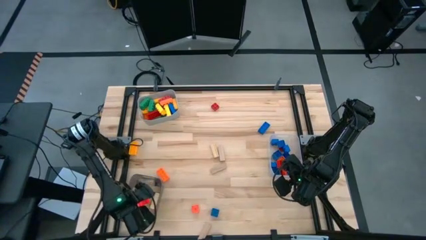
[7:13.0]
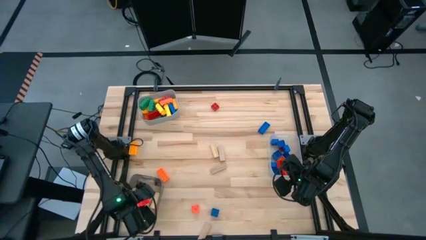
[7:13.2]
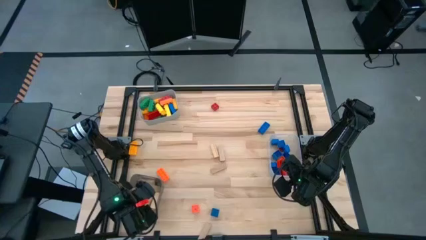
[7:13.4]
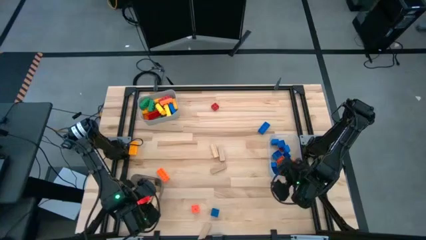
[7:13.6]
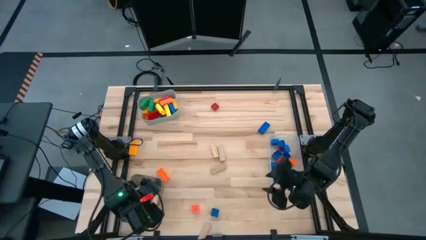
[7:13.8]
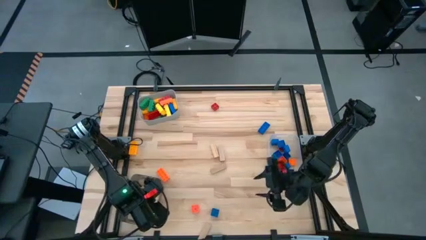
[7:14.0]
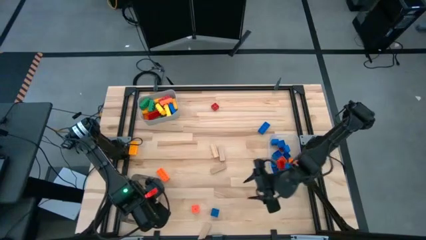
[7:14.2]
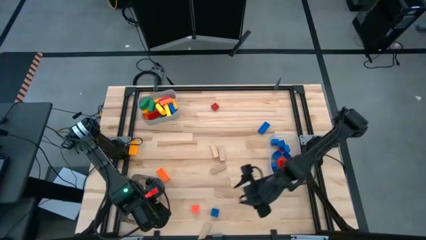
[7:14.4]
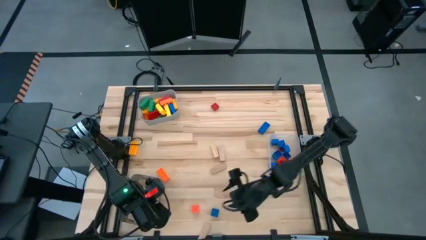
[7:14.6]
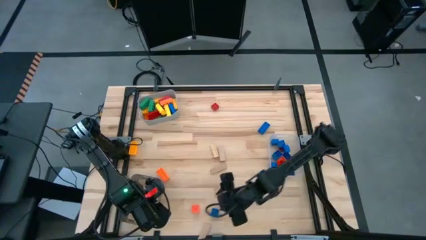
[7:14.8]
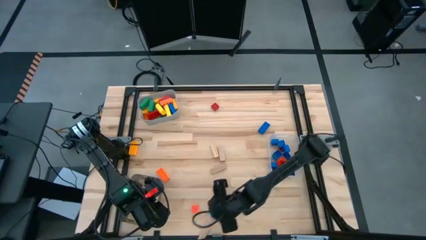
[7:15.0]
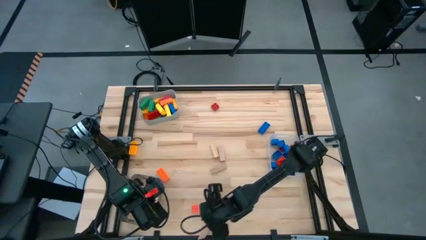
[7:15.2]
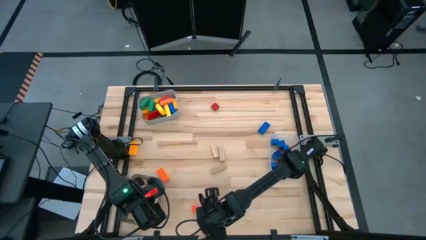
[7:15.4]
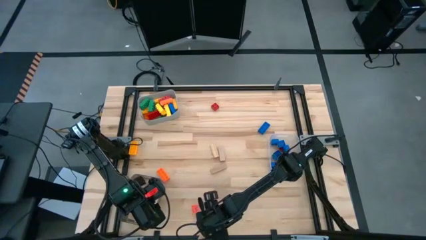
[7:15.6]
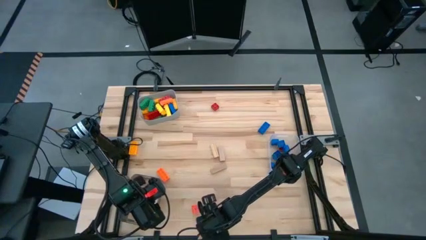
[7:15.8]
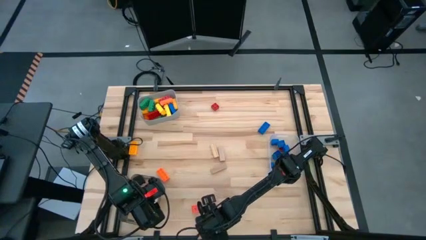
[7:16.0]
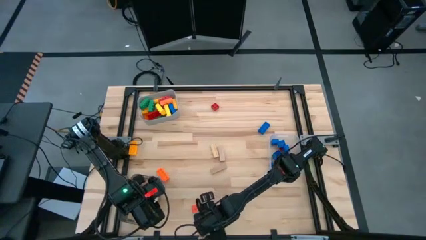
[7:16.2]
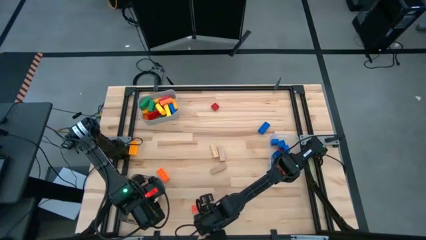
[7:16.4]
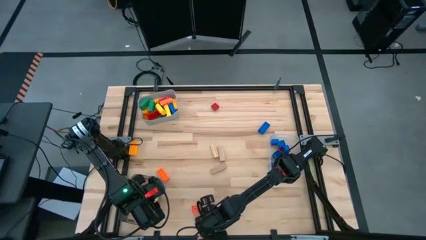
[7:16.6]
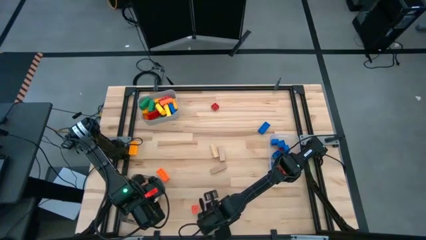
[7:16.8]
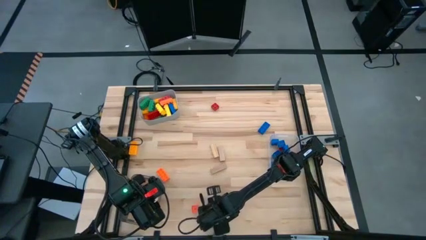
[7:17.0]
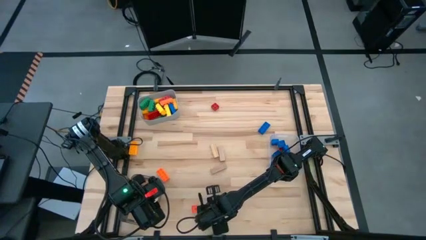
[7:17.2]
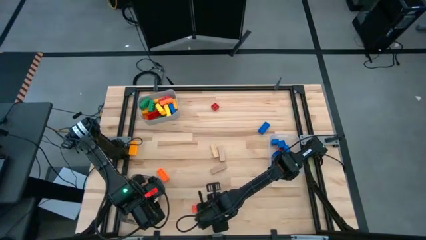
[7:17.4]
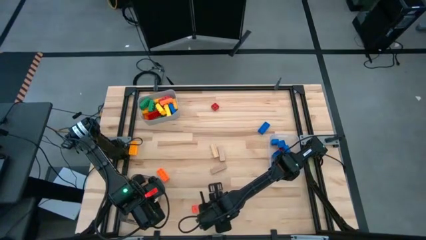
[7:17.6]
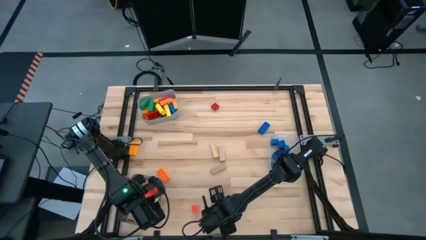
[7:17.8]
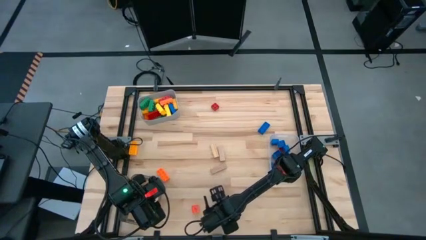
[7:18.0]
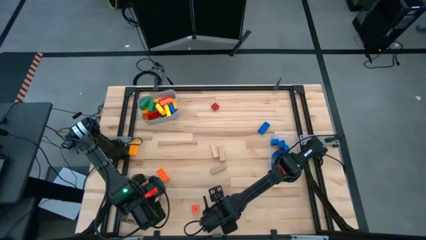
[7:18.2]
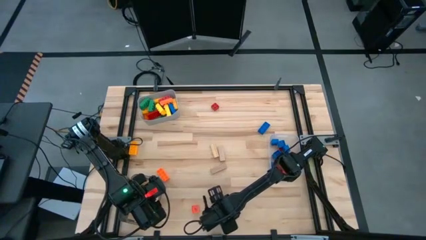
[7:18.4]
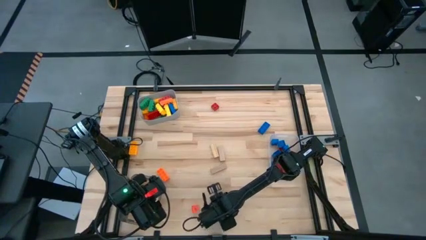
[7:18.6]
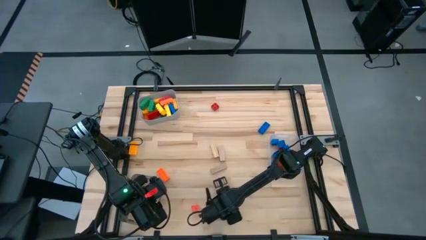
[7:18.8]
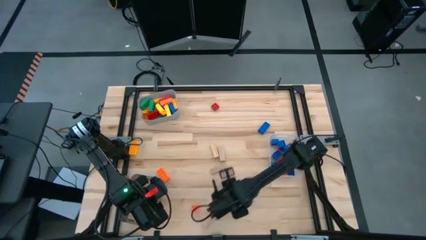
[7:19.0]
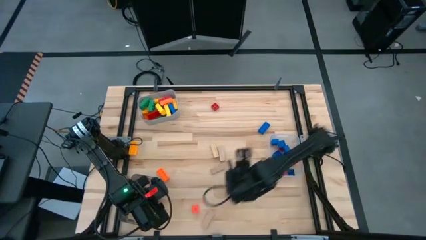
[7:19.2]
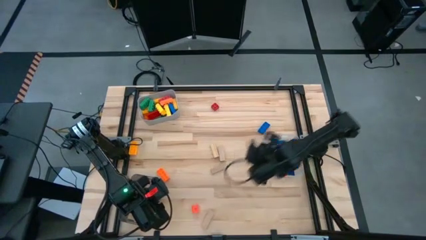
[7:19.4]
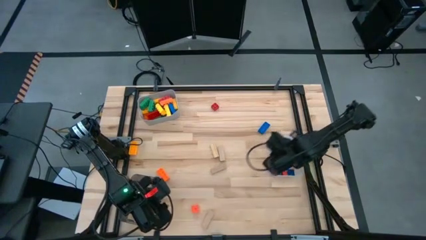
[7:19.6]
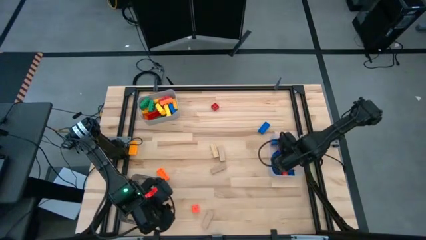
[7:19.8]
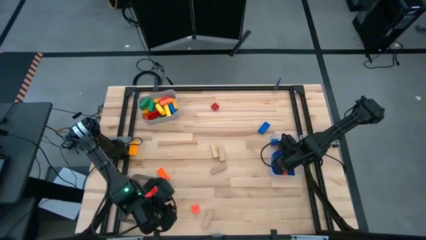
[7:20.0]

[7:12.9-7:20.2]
Task: Sort blocks by size
Put the small blue game piece into the transparent bin

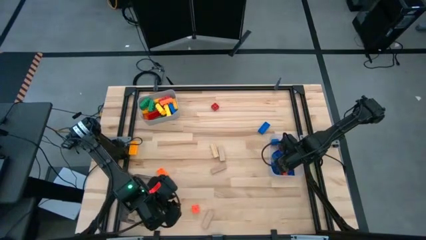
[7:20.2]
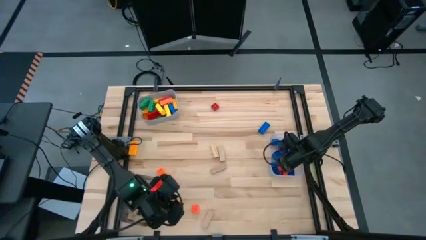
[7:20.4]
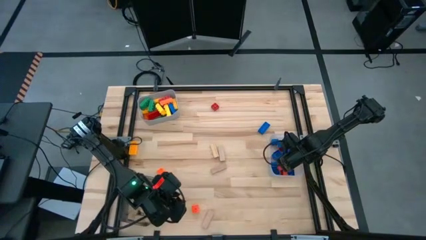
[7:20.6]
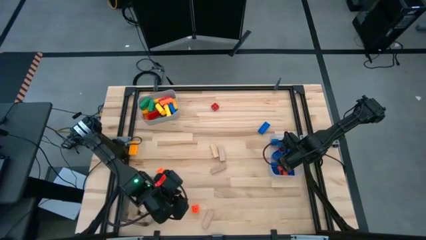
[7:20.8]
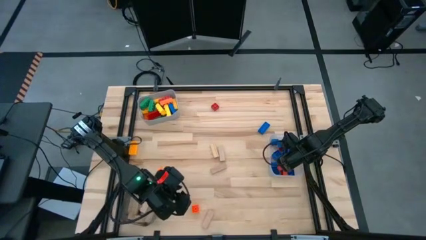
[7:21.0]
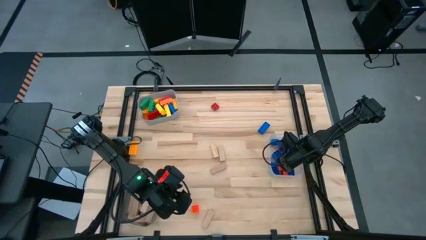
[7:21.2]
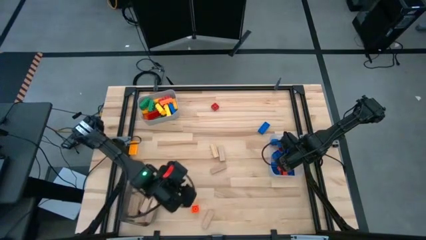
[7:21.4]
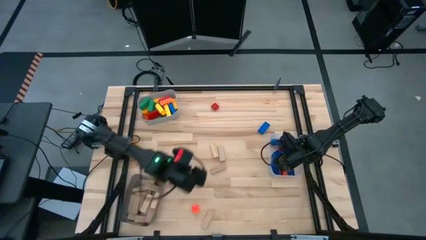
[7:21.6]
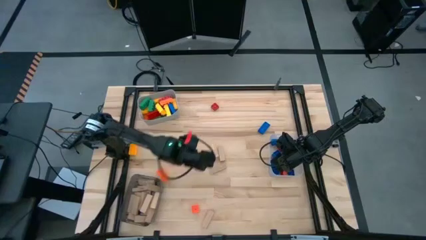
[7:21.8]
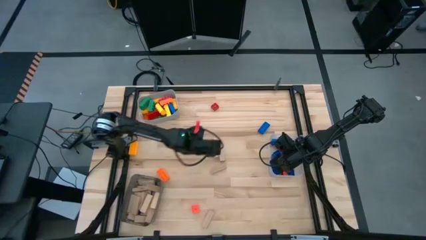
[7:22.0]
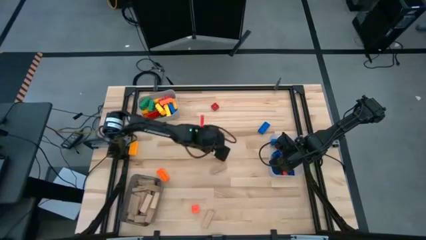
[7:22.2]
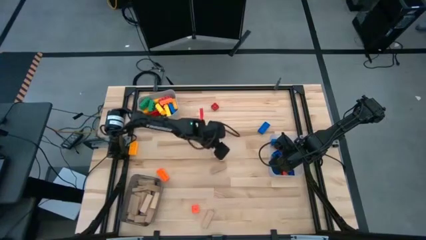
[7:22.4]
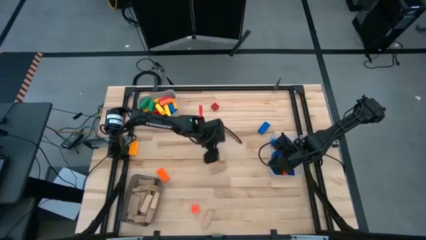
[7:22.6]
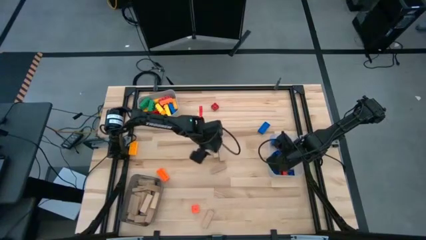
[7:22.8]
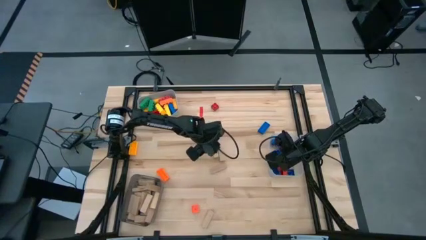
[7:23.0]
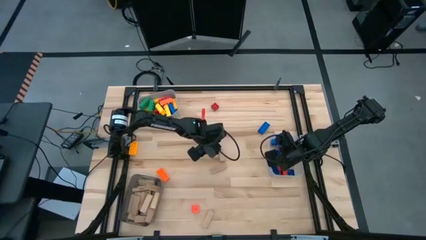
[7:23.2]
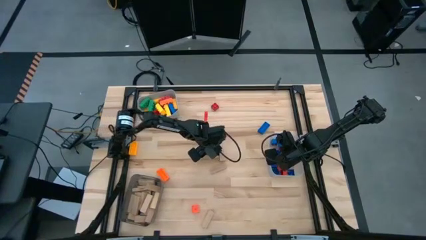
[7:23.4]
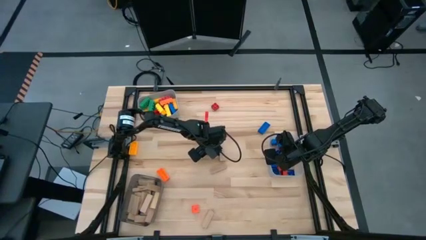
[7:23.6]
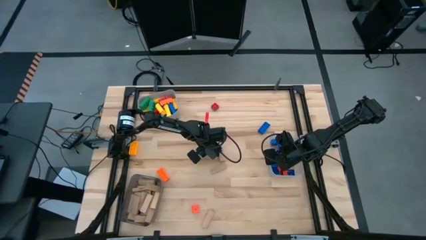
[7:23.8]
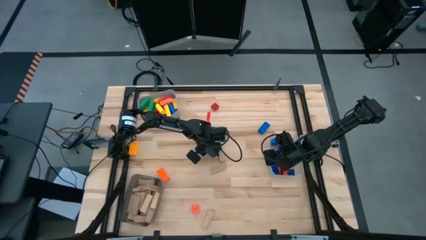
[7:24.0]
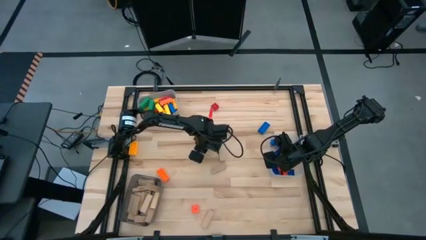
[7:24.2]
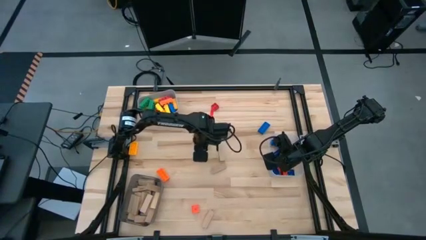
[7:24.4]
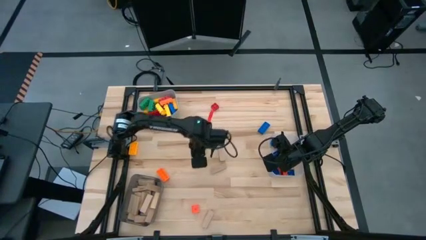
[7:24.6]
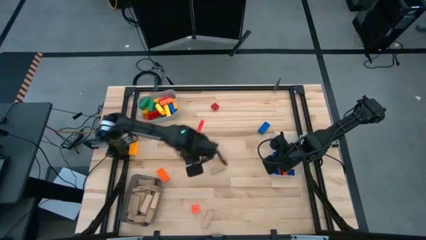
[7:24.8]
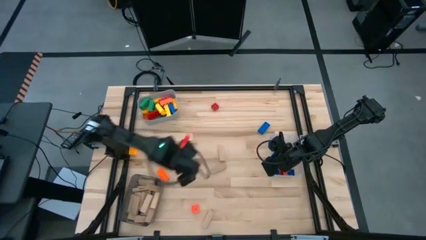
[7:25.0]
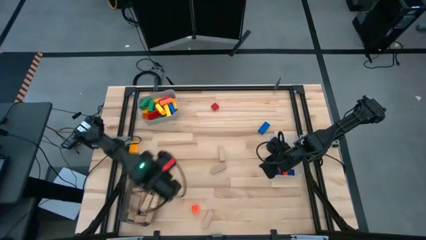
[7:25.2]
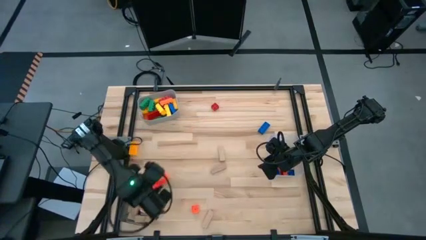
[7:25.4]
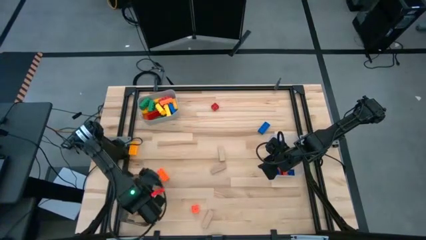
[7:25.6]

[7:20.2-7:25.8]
Put the brown block into the black bin

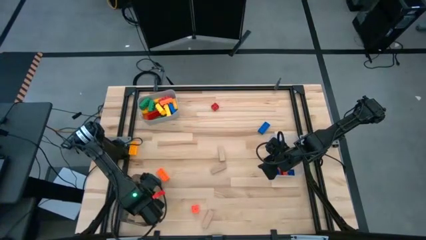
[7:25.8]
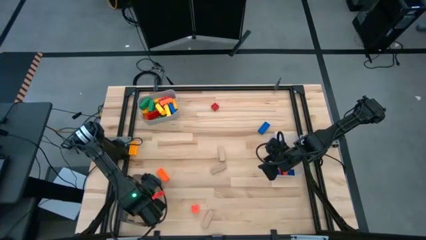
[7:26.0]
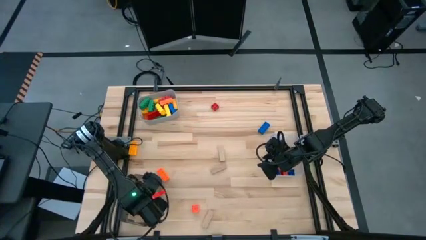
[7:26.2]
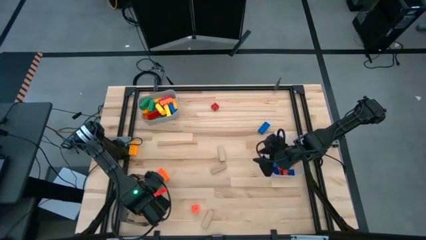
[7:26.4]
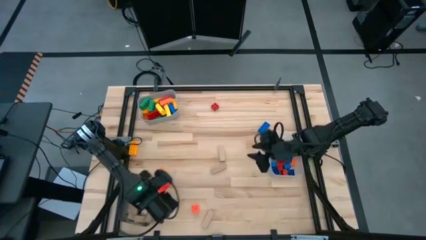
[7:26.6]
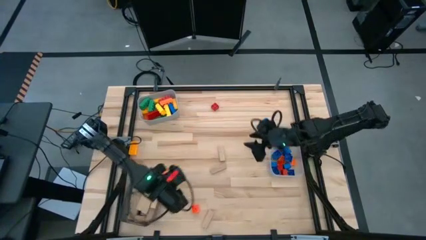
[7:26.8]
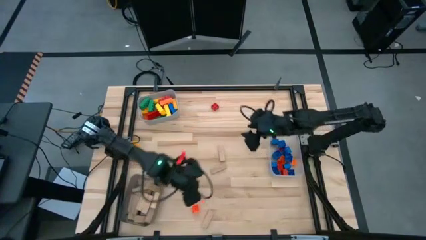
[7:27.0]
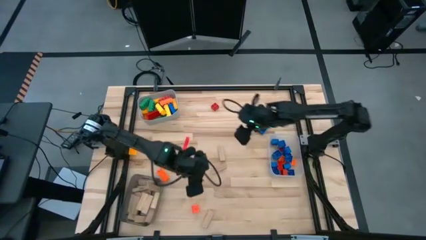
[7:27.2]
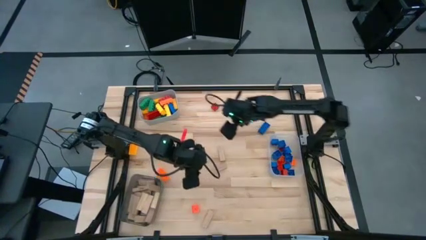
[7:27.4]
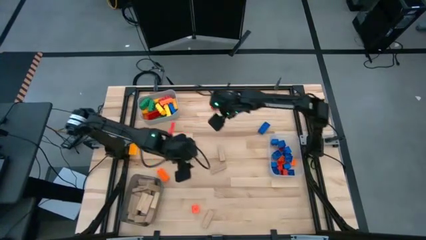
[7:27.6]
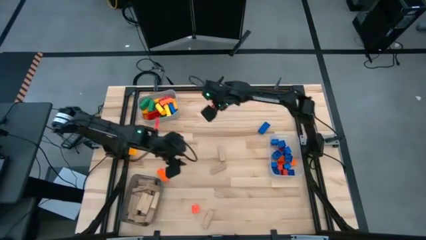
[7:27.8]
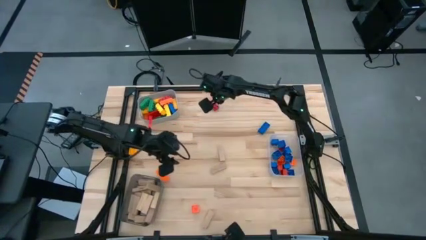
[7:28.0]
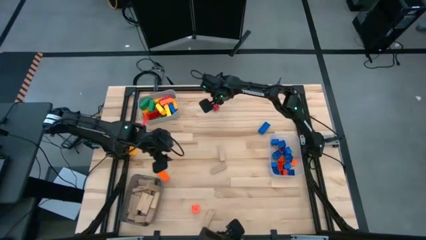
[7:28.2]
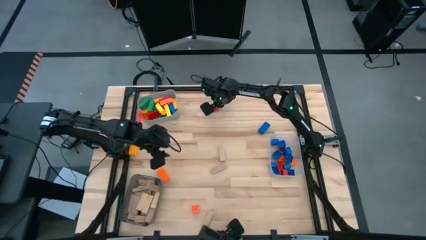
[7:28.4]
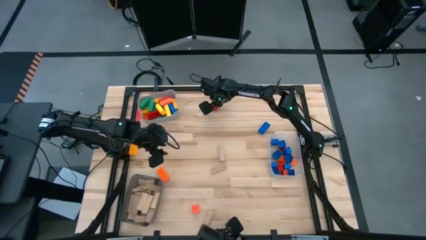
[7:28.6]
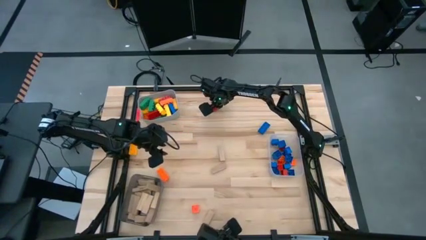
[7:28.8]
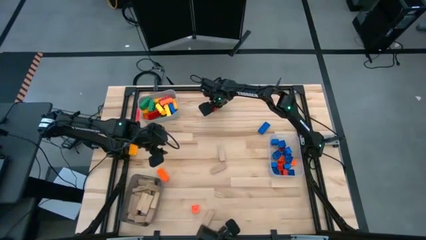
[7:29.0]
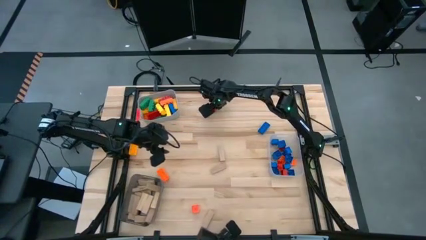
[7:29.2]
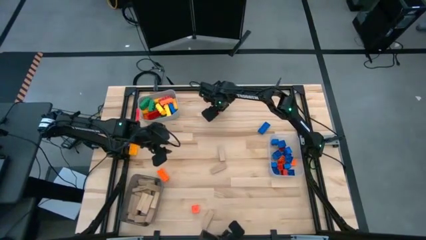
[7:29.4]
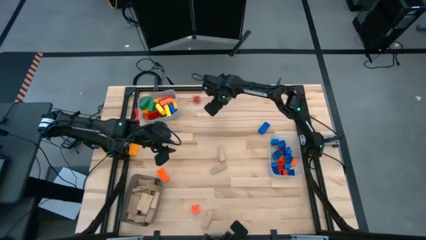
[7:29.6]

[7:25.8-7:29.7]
Put the small red game piece into the transparent bin
